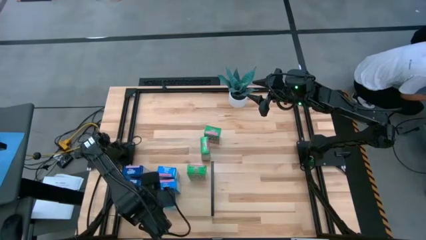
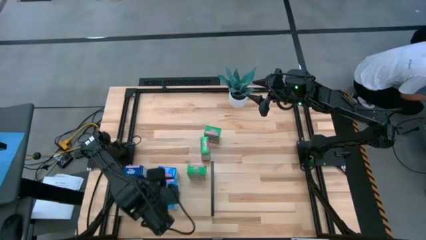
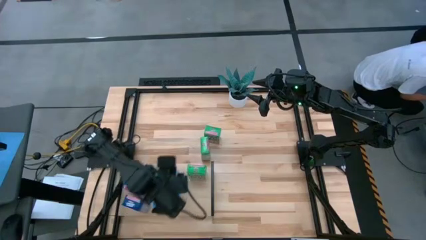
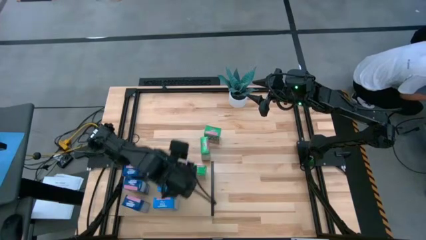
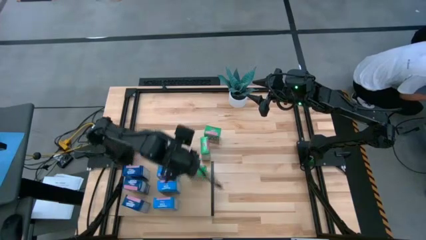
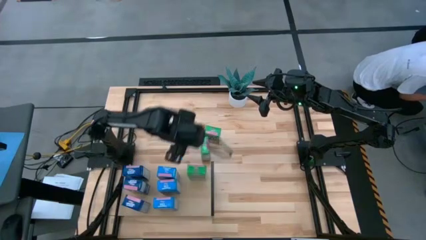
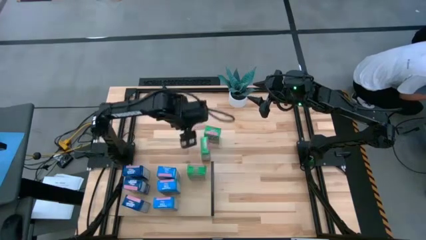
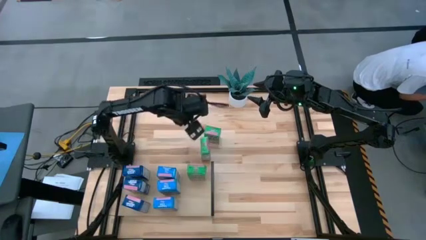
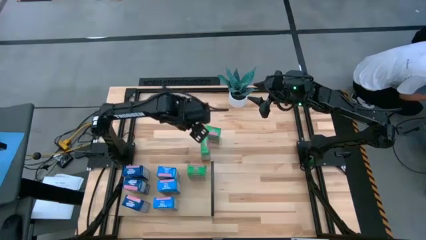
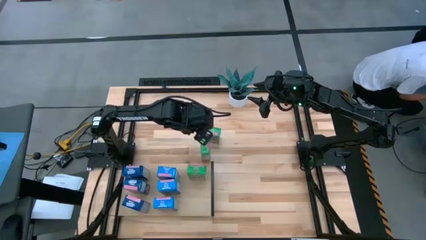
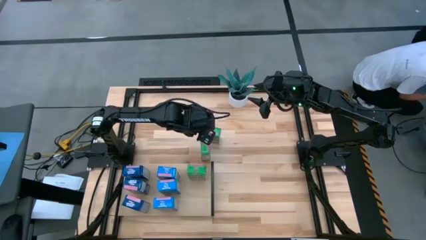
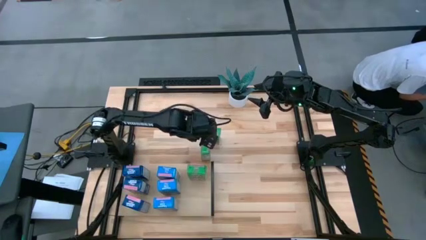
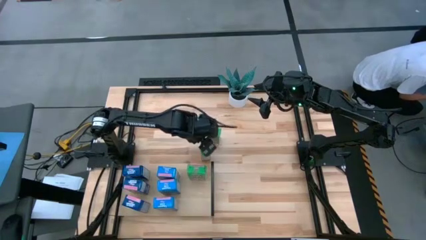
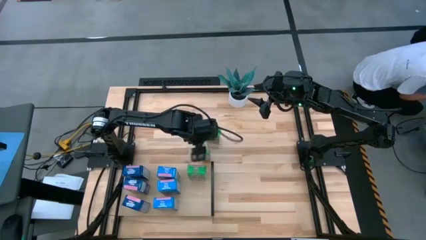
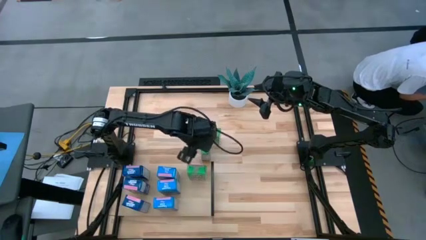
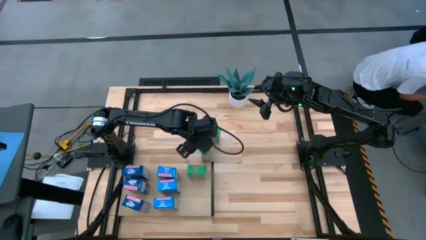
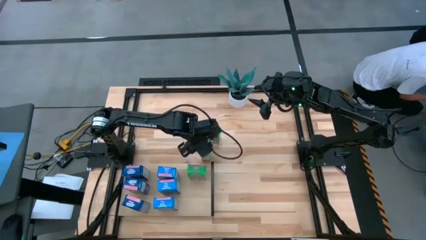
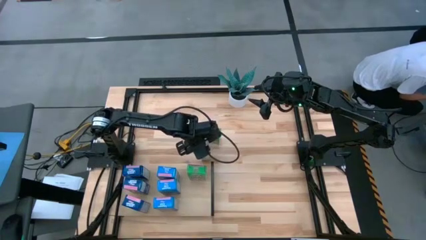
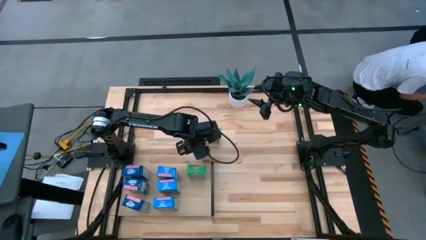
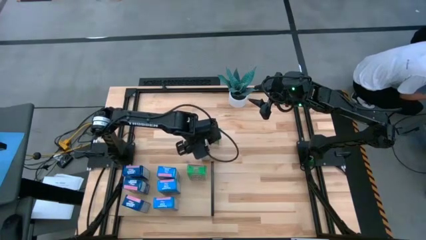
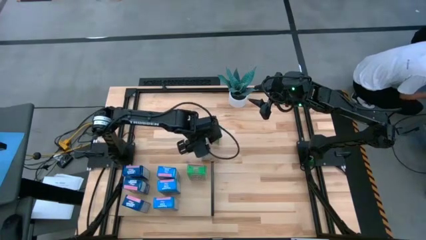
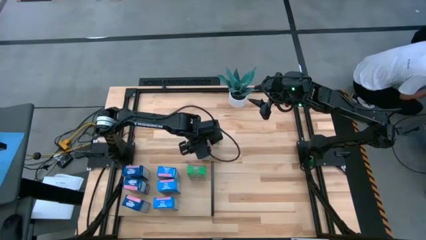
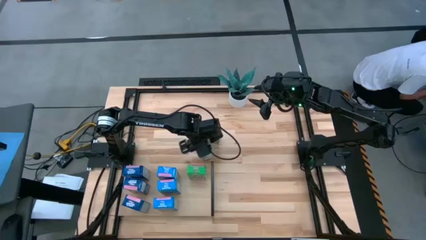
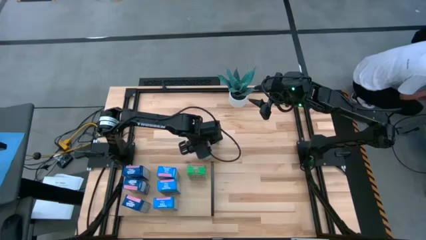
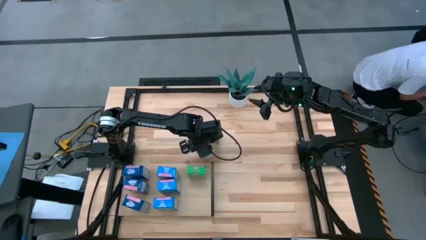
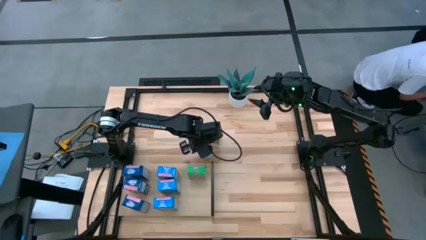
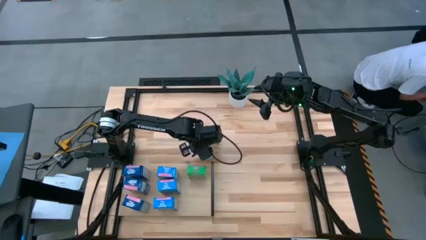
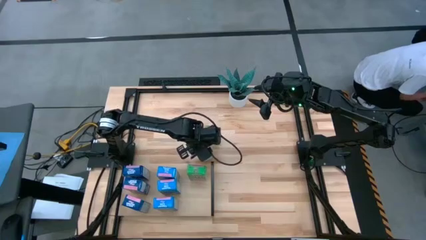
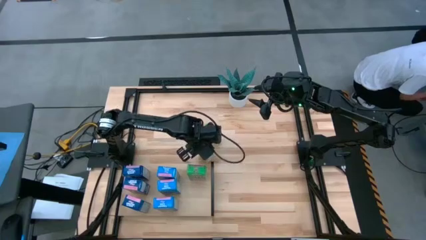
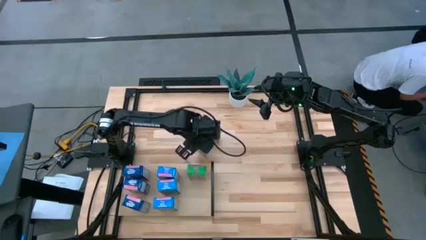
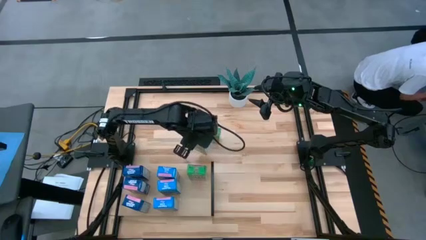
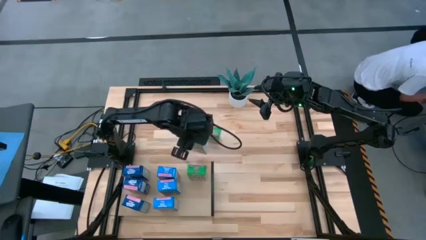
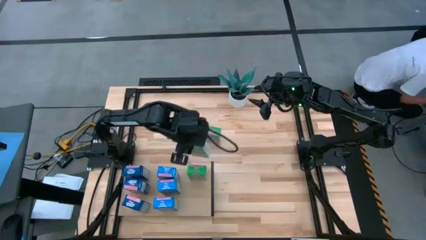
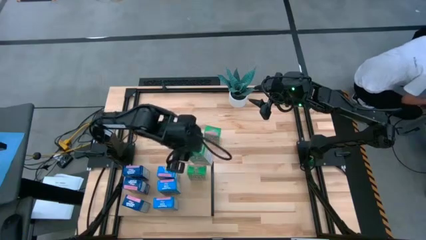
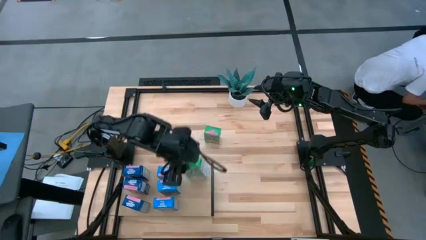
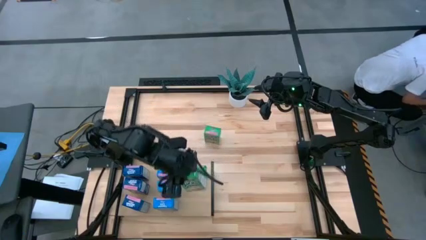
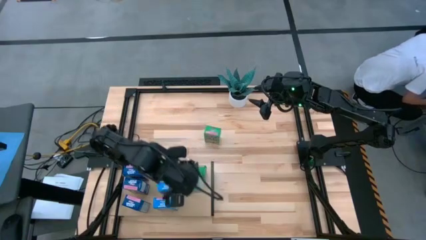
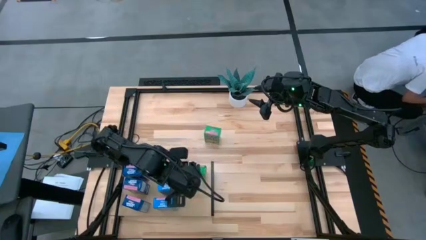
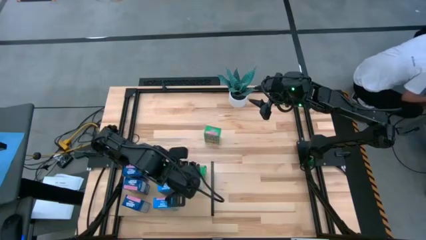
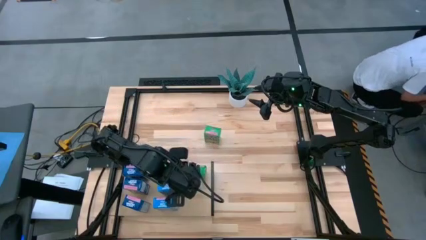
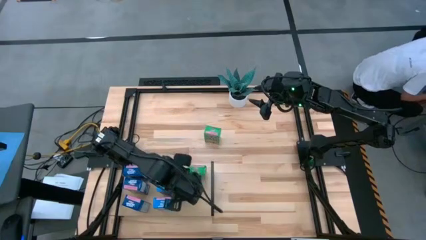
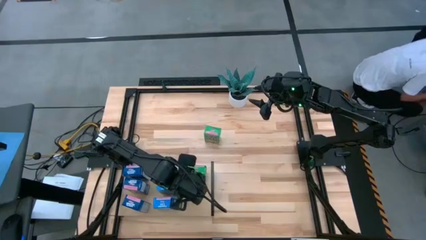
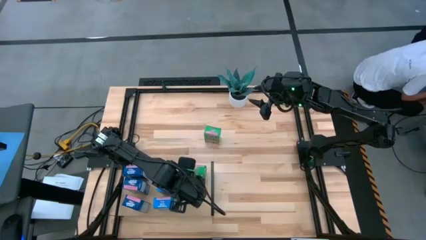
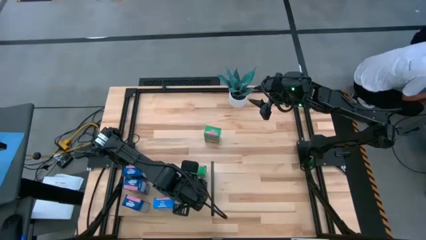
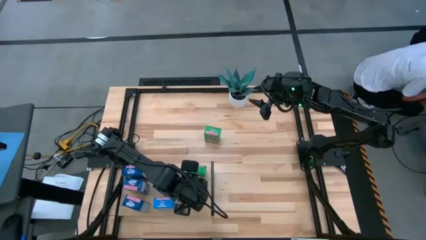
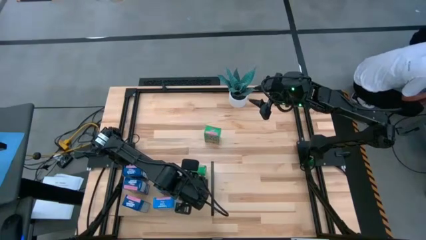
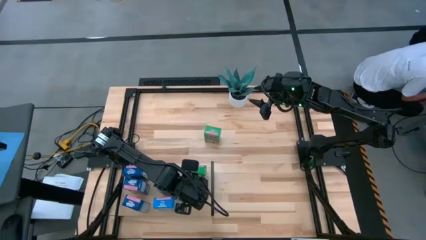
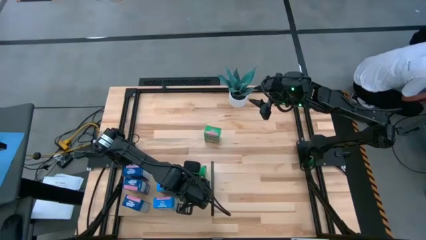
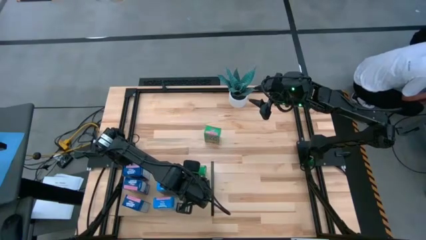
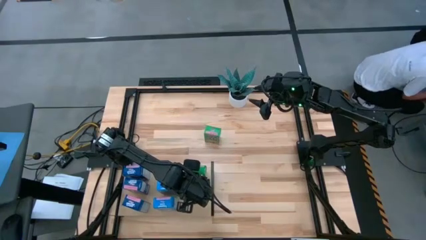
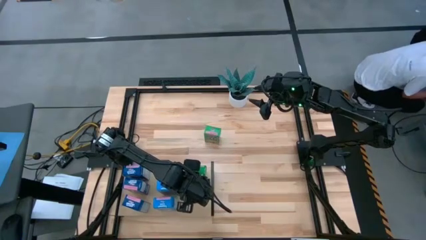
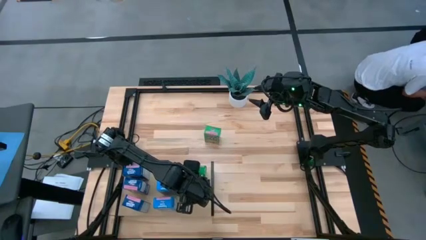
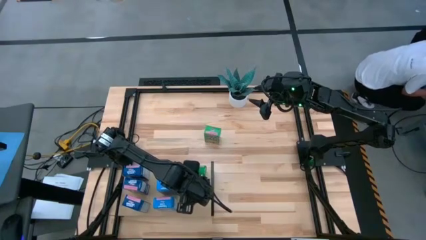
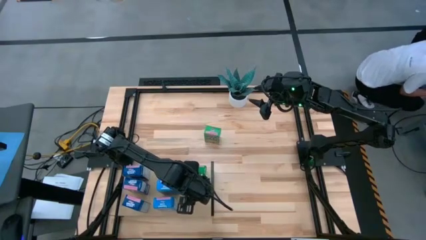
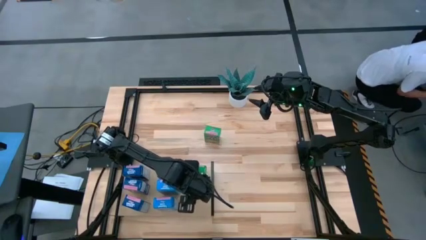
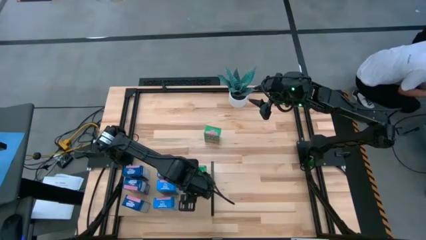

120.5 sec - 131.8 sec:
Task: Stack cereal on shelf
Put the bottom green cereal box on the shelf aligned with the other green cereal box

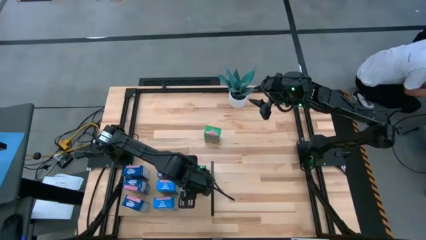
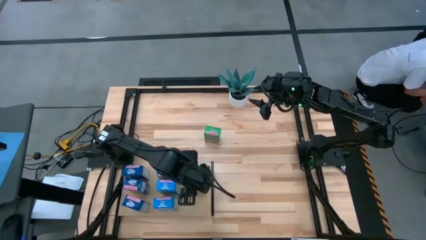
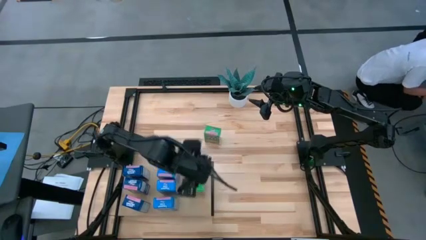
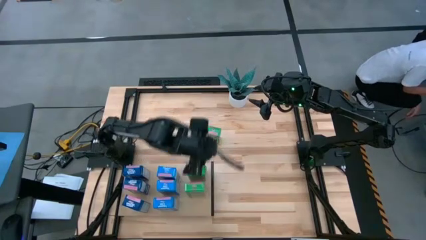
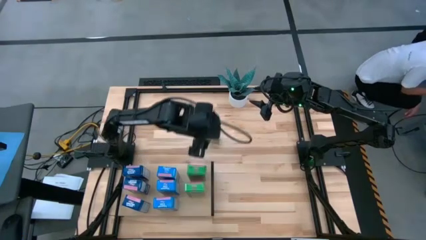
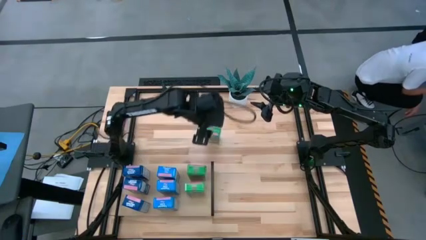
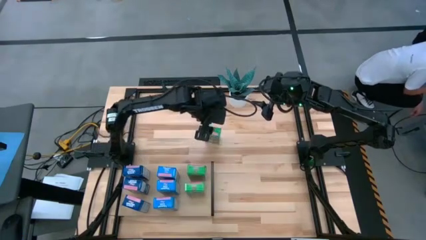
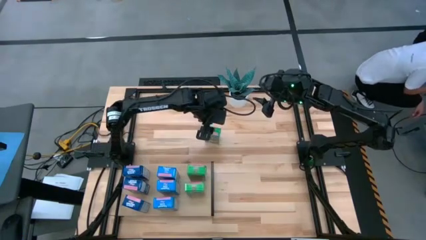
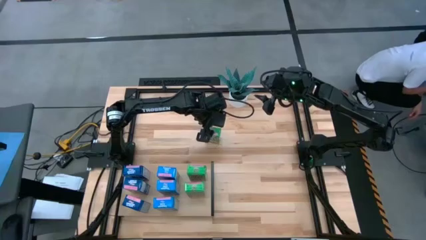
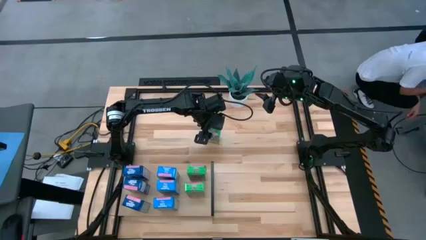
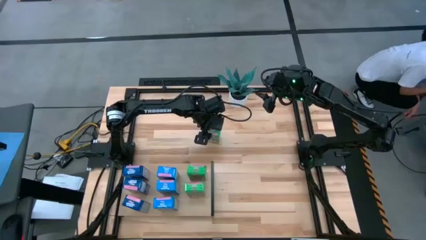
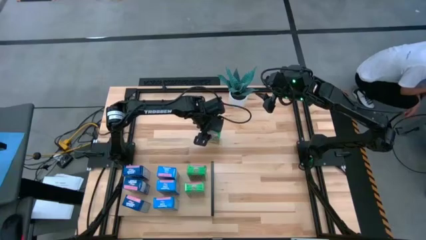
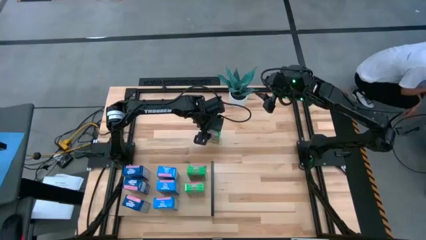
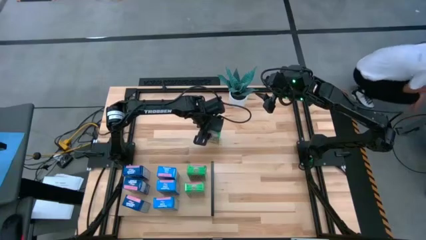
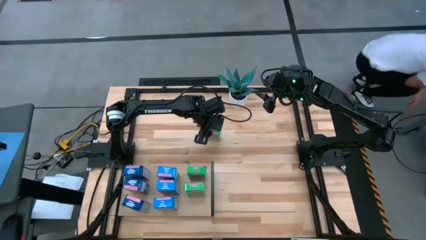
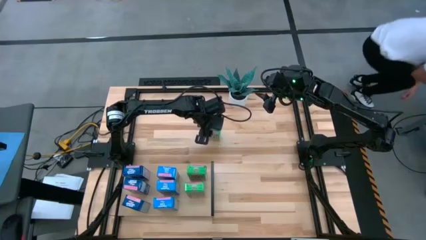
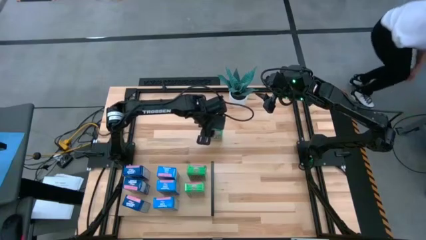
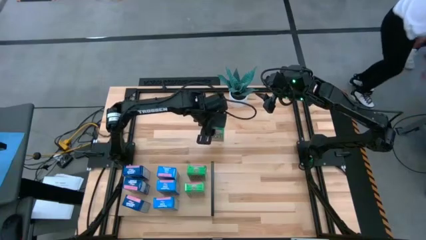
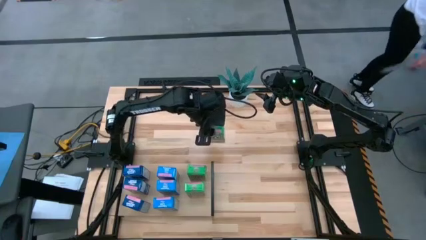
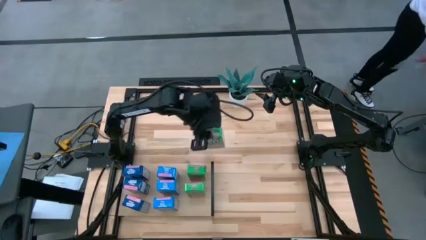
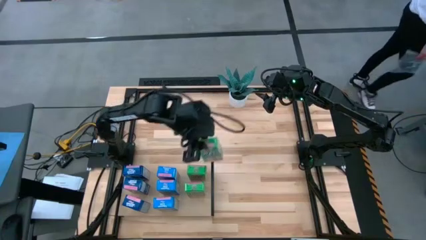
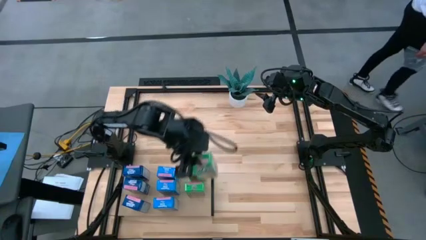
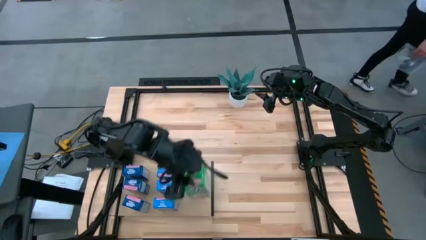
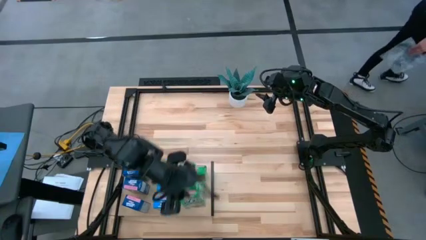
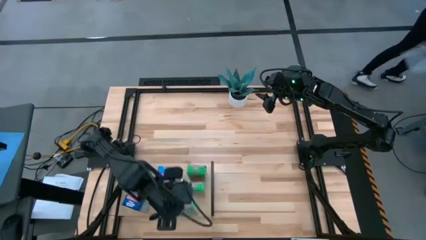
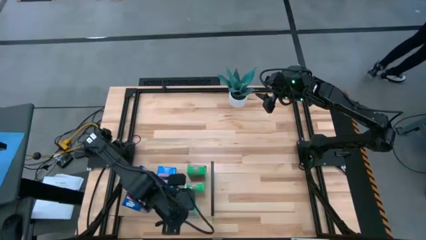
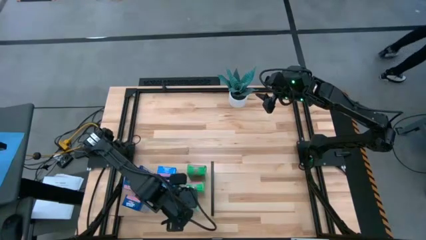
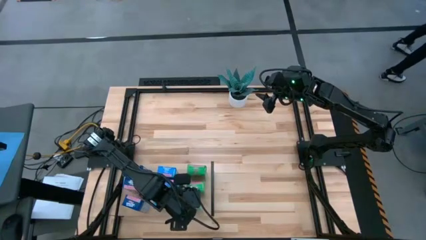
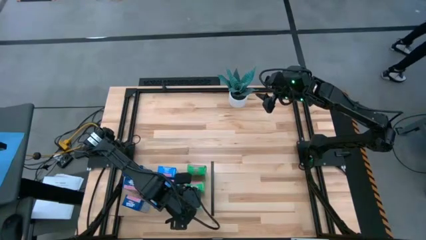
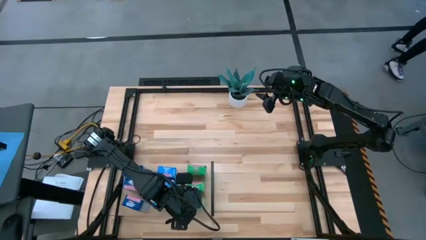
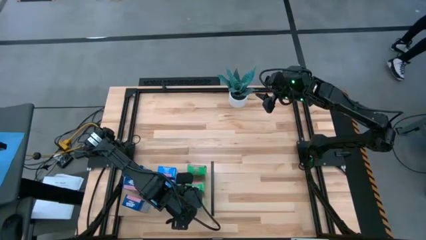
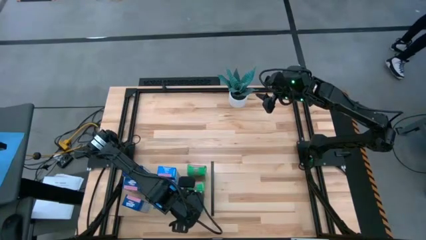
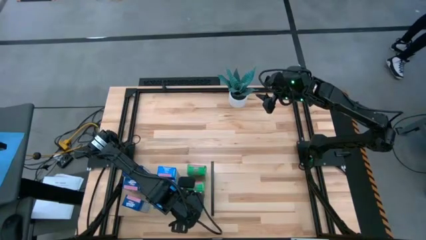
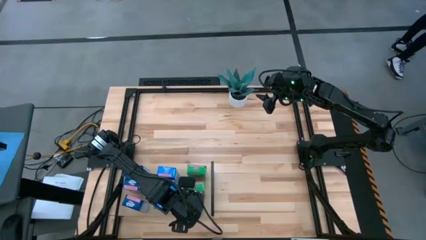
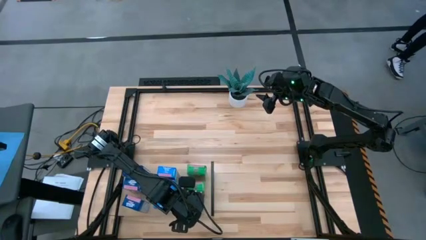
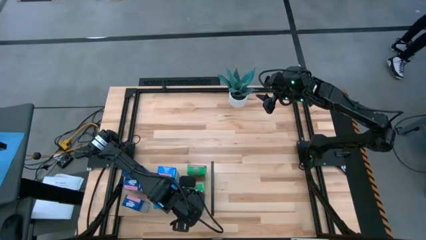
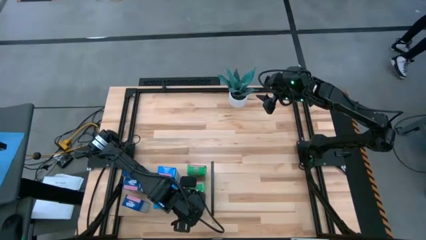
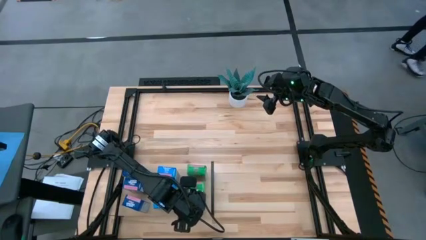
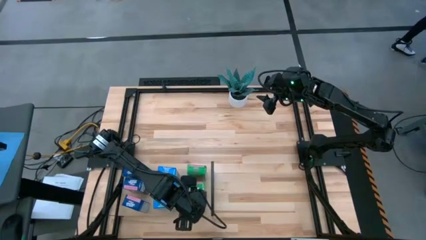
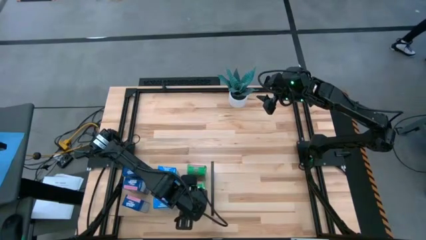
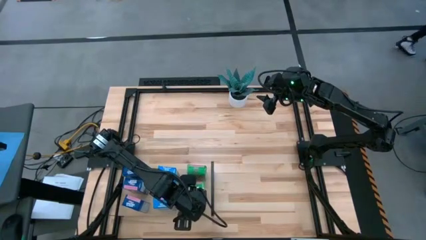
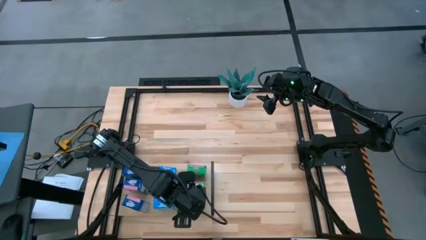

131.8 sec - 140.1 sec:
Put the green cereal box on the shelf aligned with the other green cereal boxes
